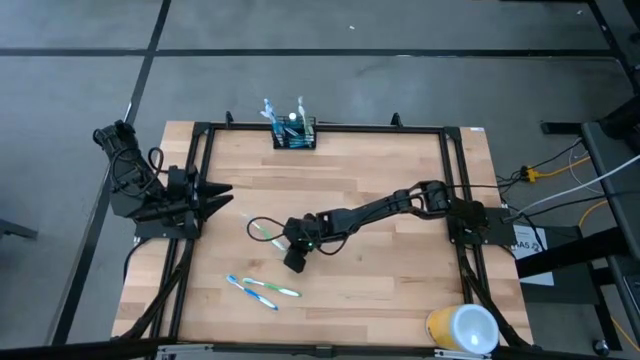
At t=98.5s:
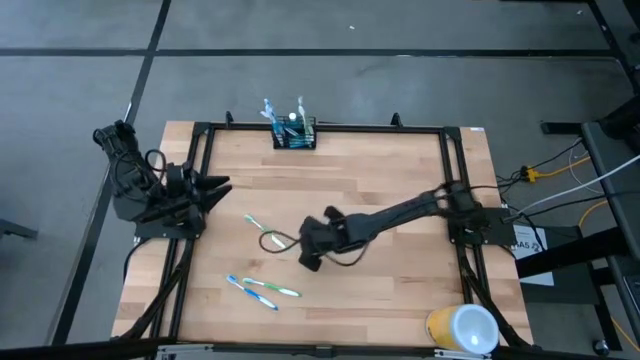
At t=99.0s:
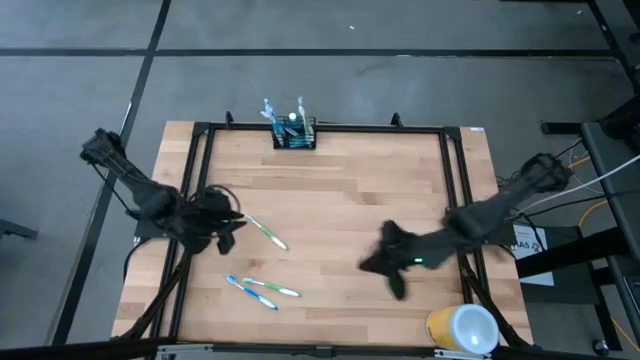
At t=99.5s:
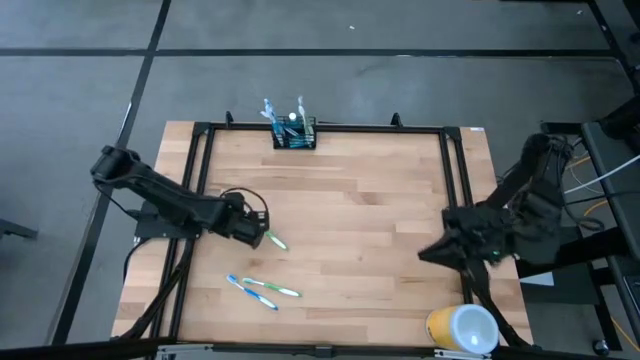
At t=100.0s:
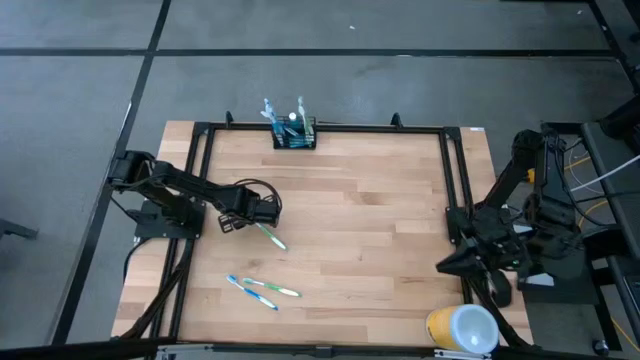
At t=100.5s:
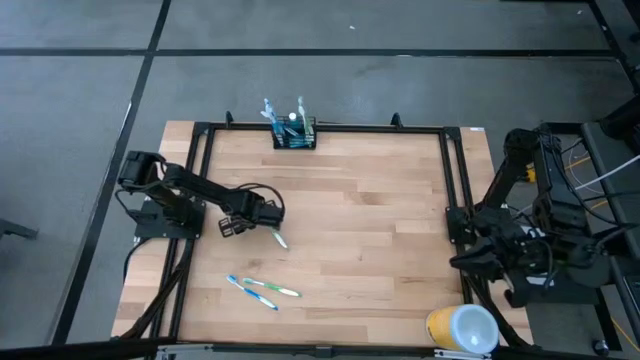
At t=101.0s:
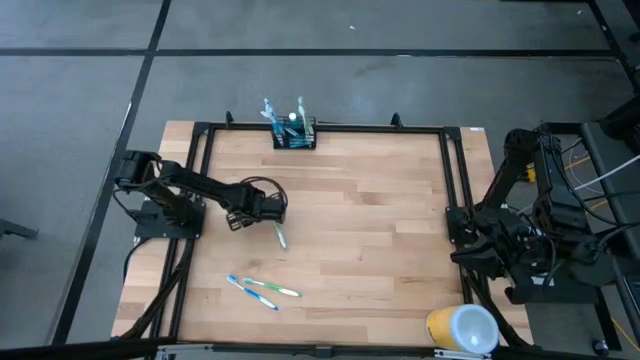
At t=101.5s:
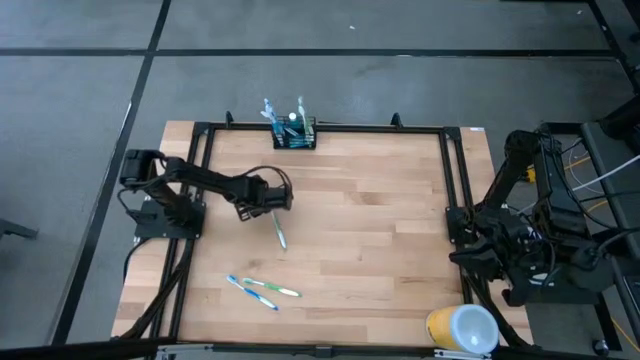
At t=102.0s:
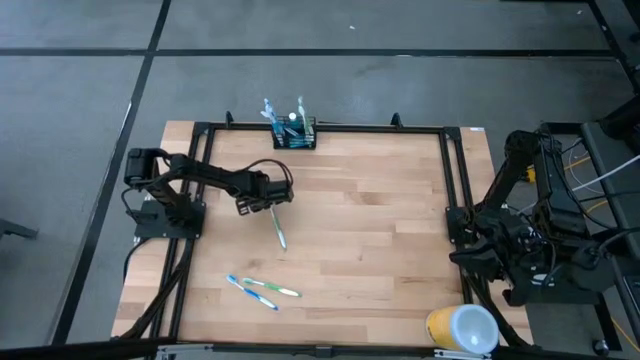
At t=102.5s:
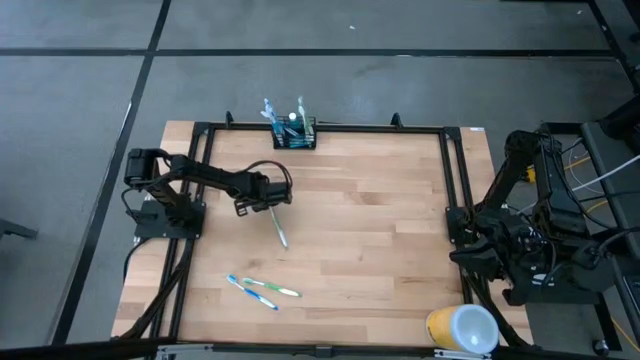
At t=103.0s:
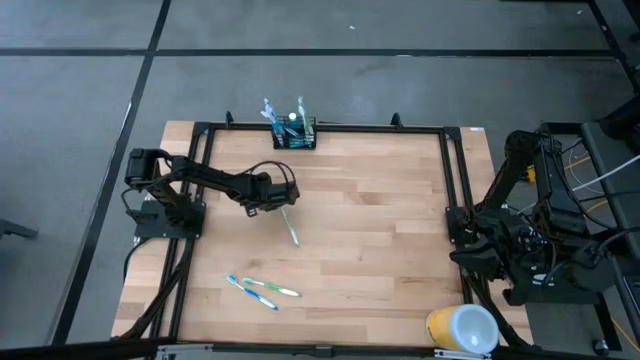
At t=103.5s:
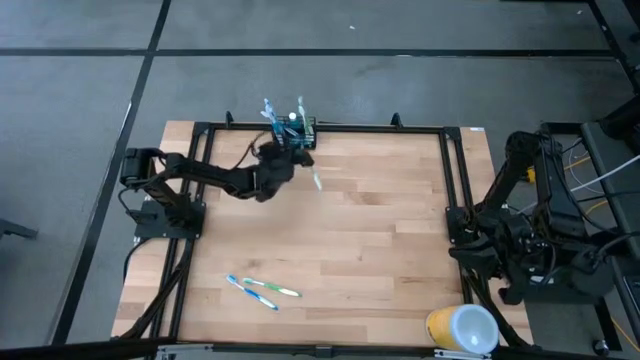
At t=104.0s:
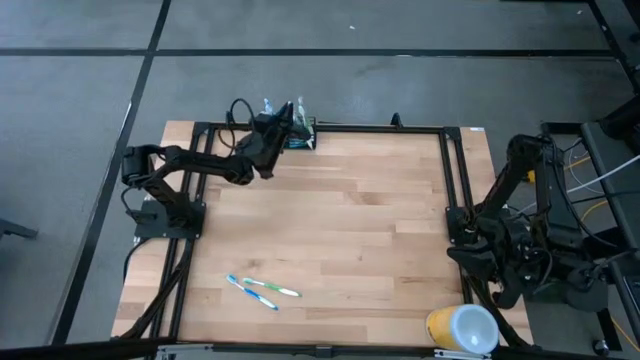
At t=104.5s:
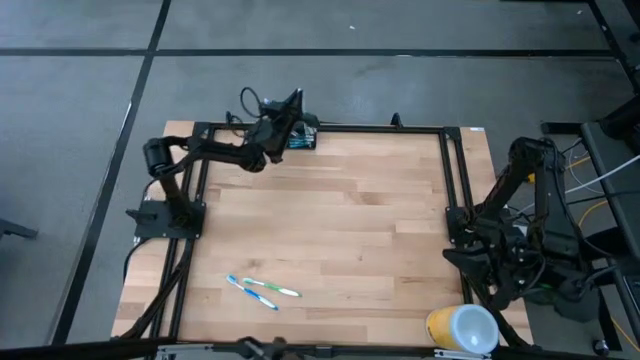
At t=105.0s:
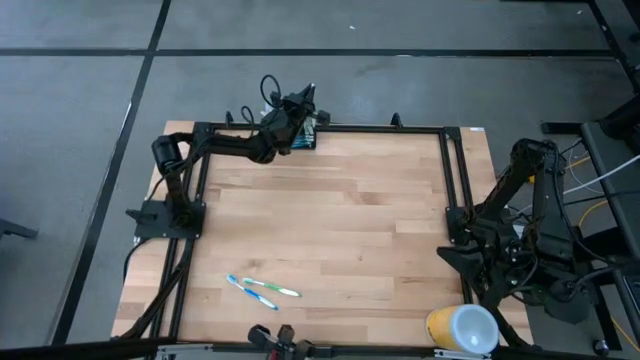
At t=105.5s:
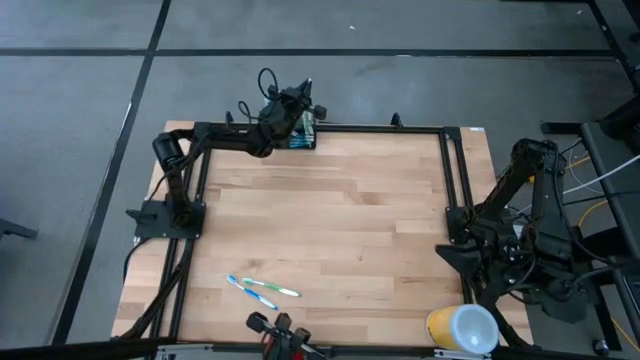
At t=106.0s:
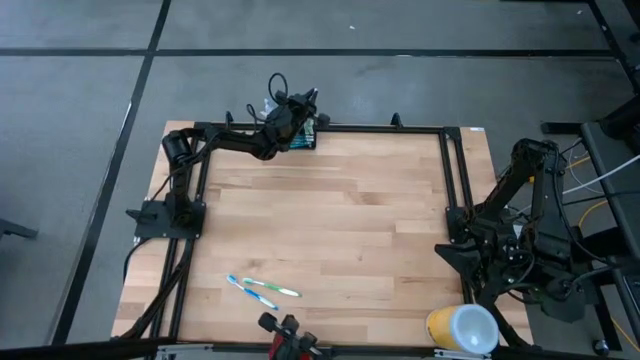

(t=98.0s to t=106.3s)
Task: Pick & Place toothbrushing station
Put the green toothbrush into the black wire organizer

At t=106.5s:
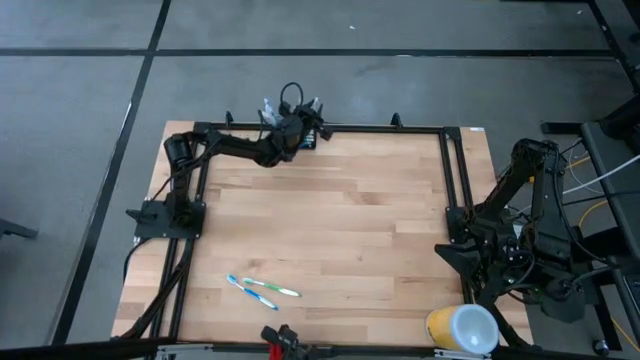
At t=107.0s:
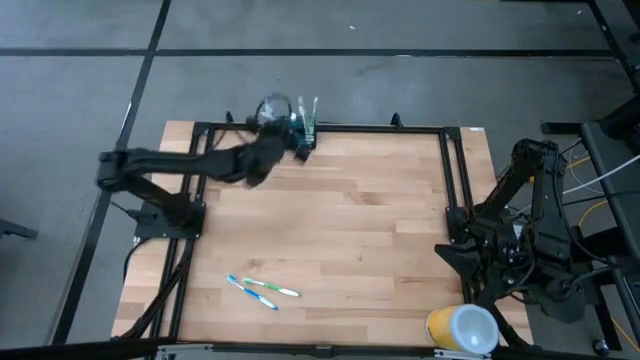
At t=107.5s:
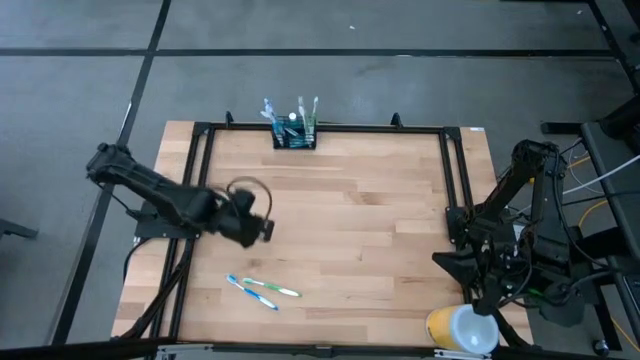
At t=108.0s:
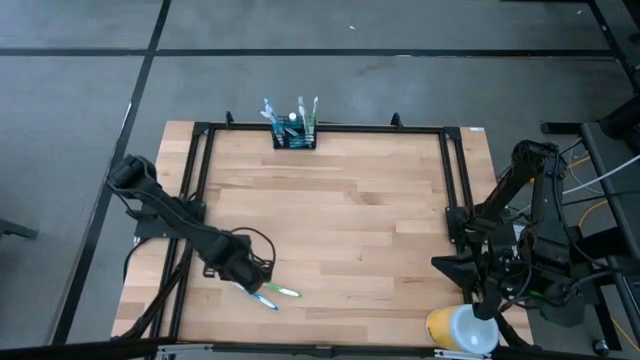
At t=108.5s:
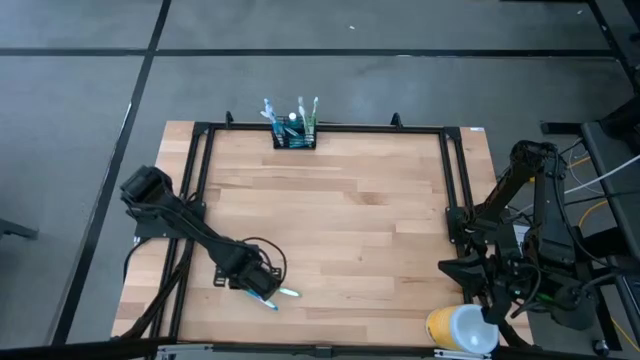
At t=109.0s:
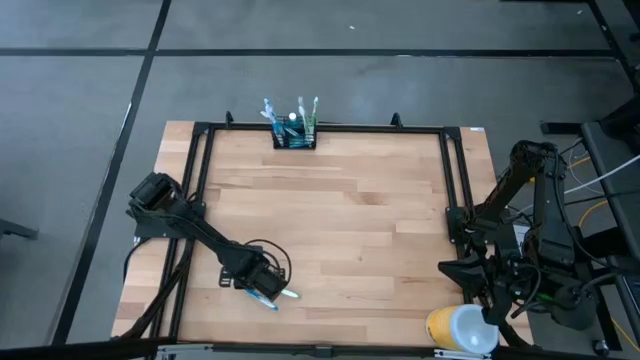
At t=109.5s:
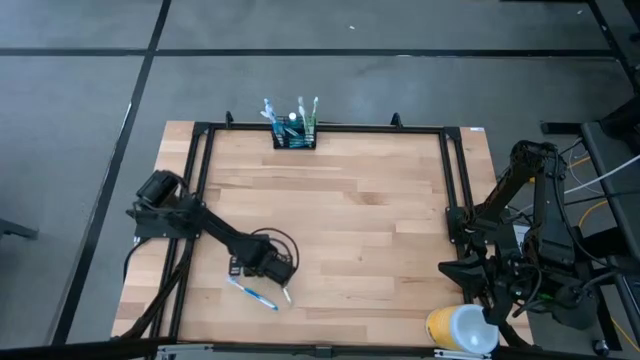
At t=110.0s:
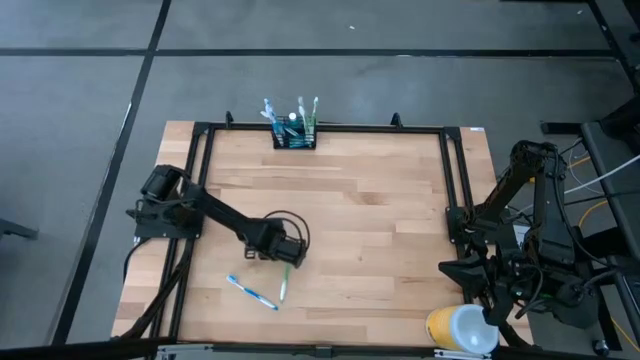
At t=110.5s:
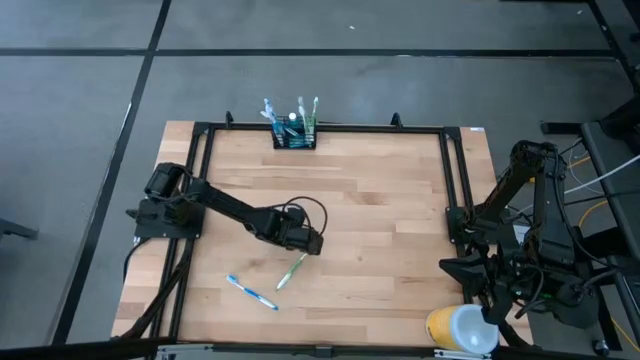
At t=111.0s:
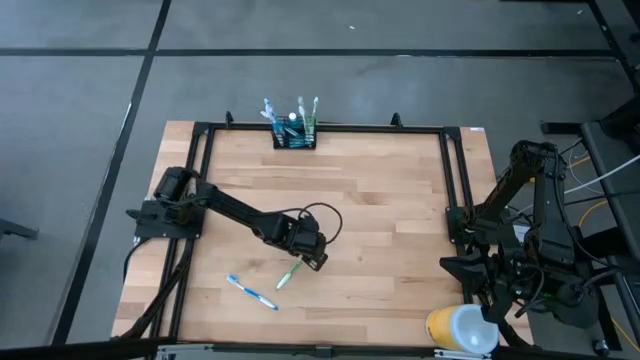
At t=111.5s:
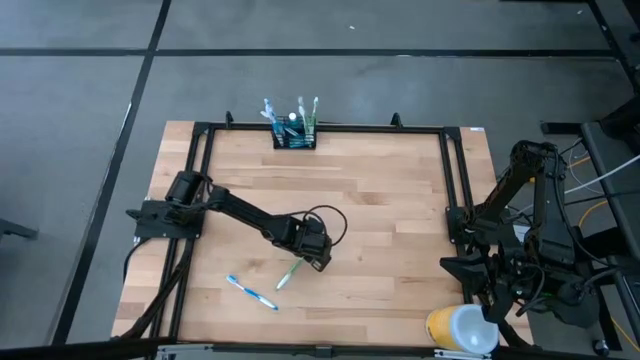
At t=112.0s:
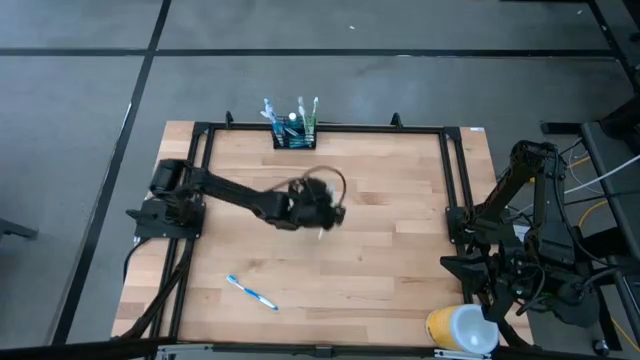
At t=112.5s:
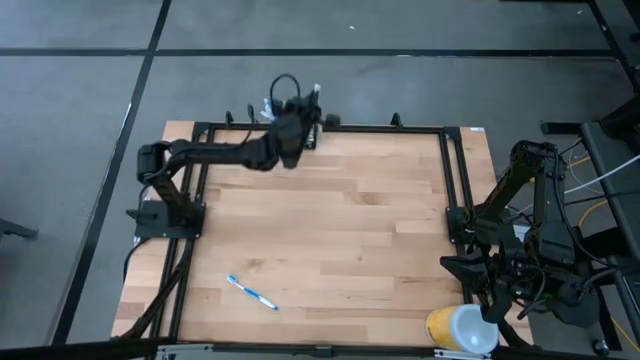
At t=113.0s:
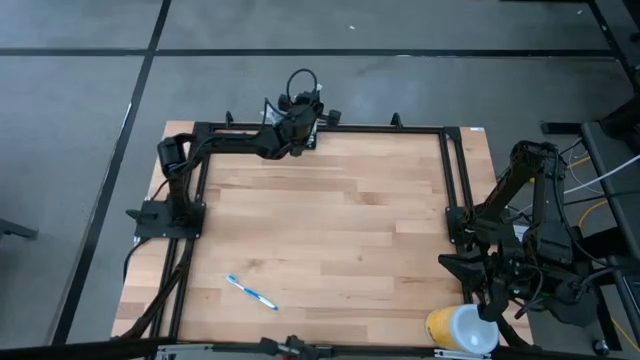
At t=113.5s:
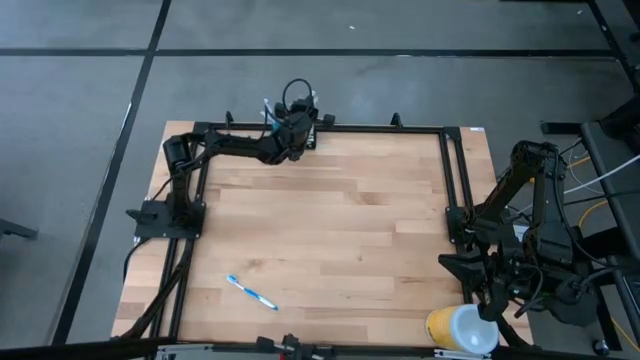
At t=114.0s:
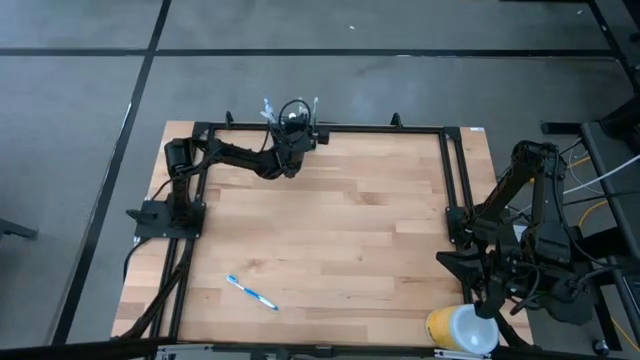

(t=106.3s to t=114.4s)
Put the green toothbrush into the black wire organizer

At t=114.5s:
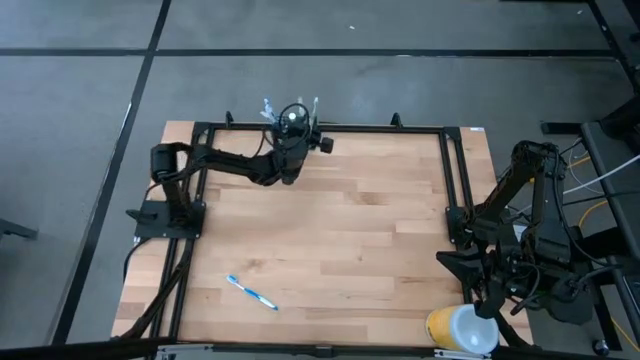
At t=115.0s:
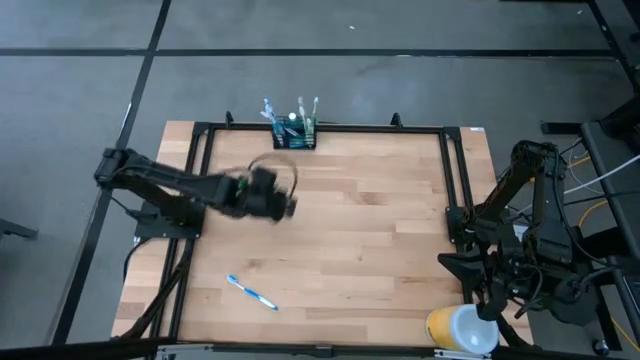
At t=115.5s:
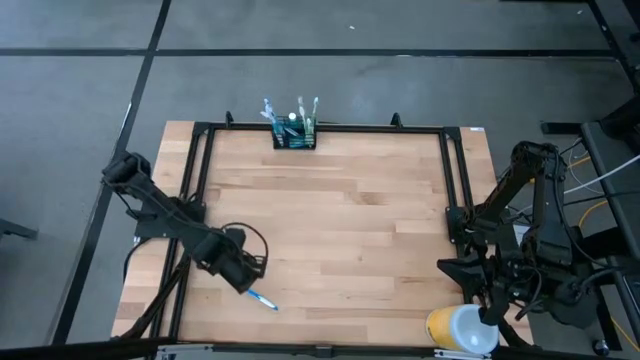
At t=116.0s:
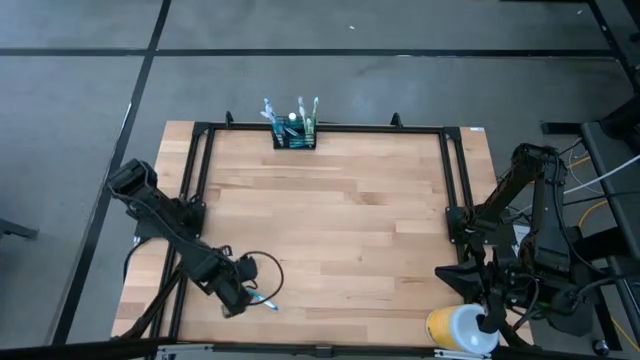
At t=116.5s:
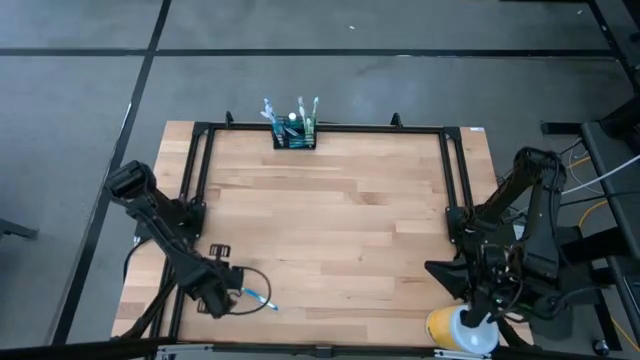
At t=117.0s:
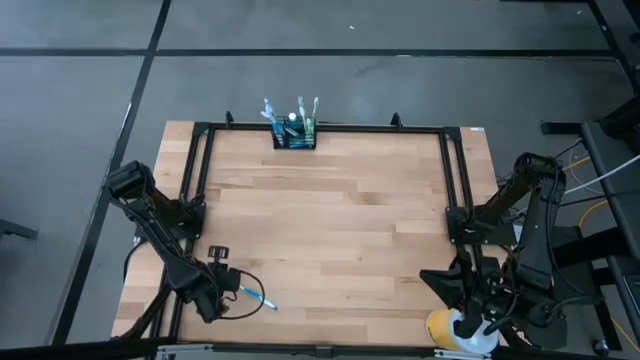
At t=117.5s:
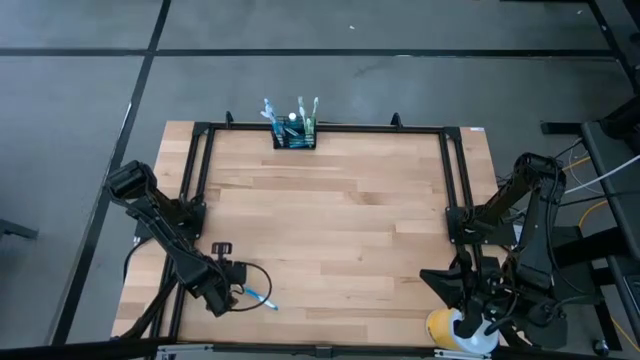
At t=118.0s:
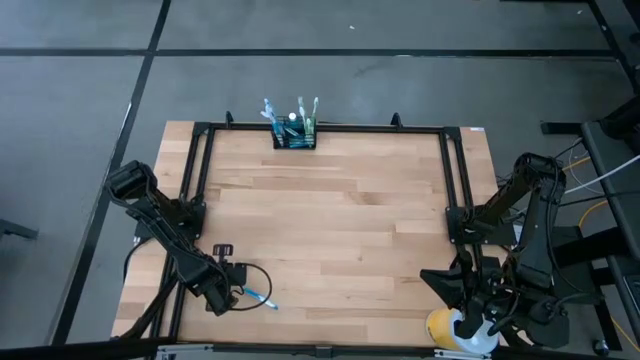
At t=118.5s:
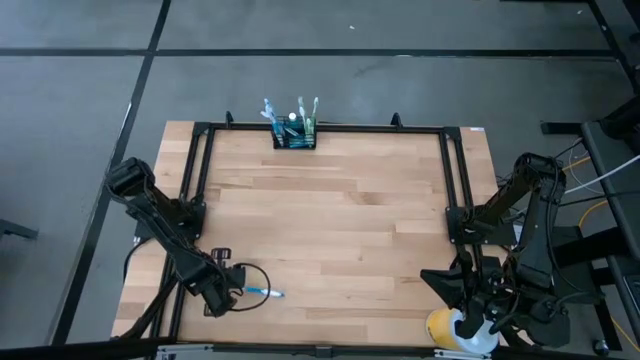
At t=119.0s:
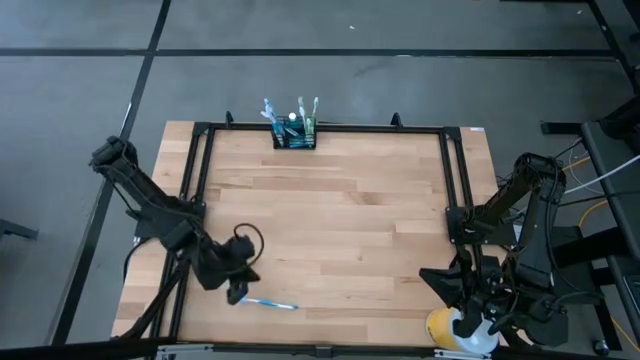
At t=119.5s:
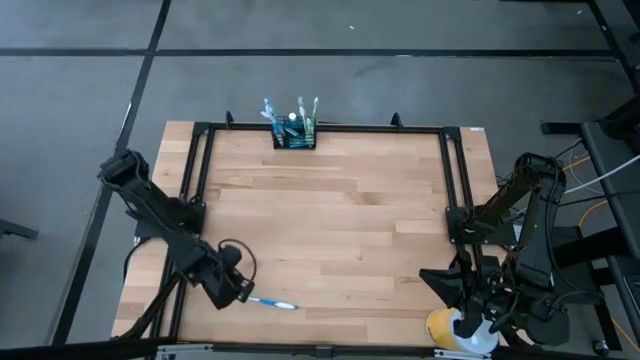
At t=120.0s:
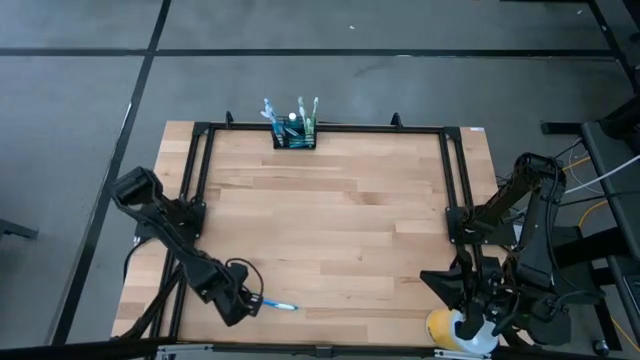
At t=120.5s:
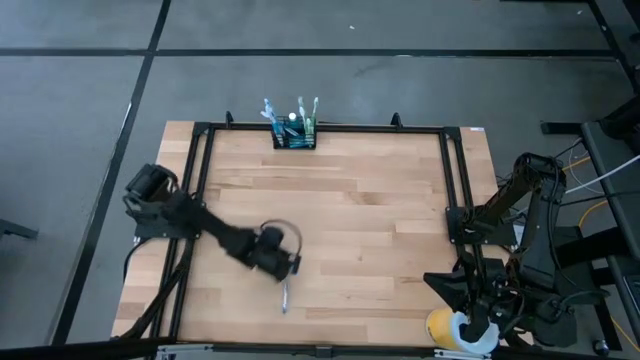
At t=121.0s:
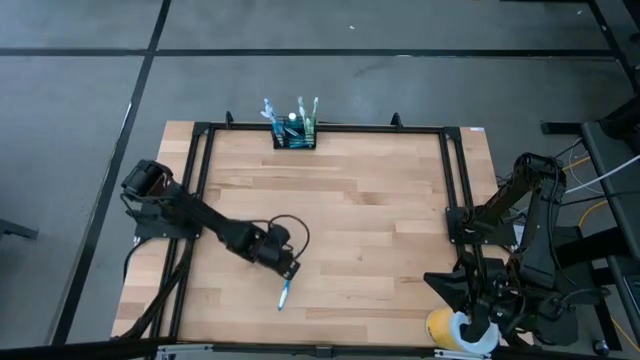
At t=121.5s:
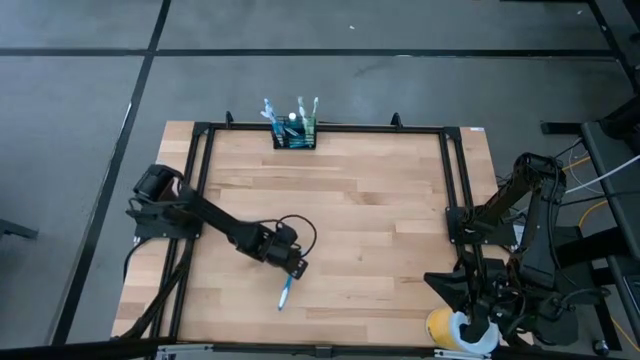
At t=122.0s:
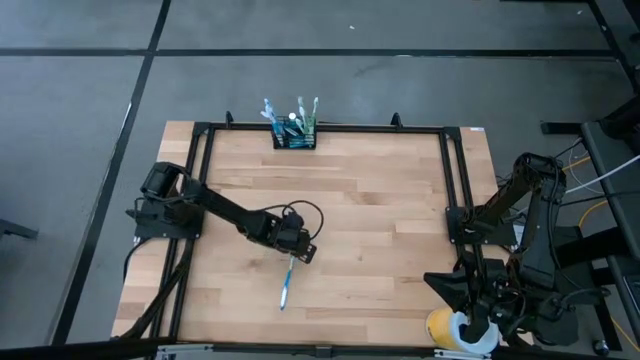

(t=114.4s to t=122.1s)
Put the blue toothbrush into the black wire organizer
